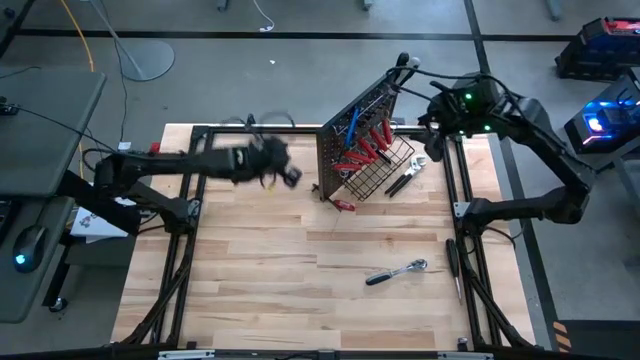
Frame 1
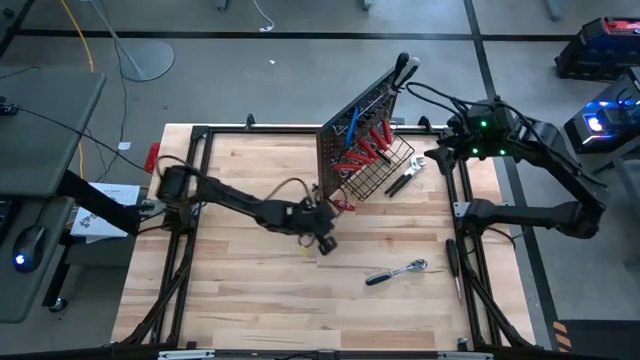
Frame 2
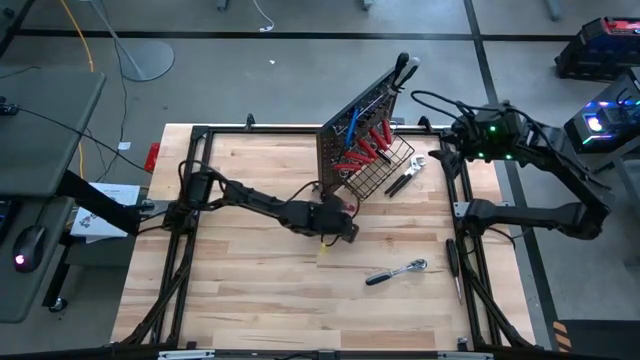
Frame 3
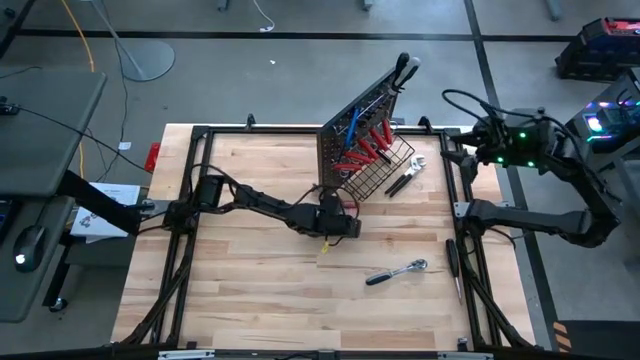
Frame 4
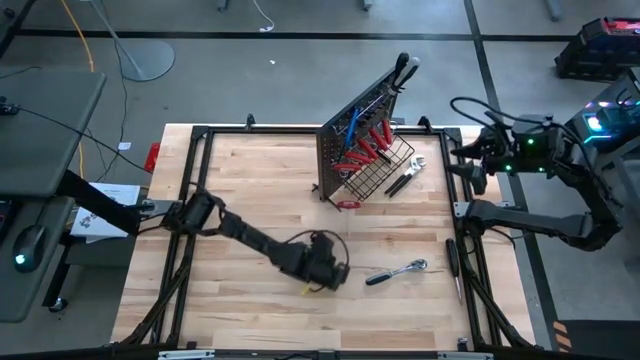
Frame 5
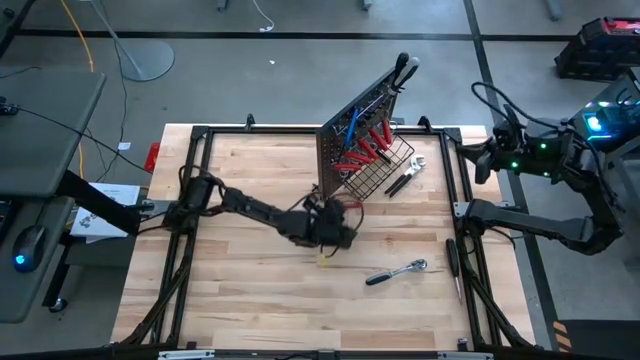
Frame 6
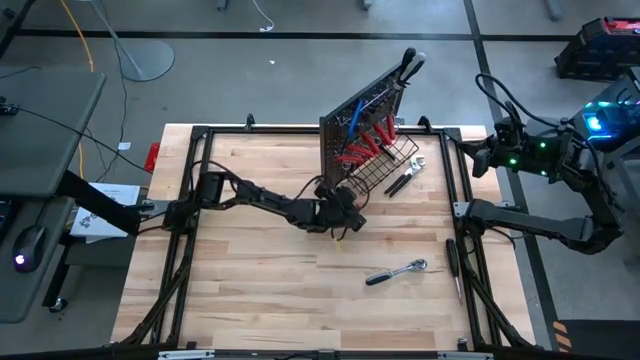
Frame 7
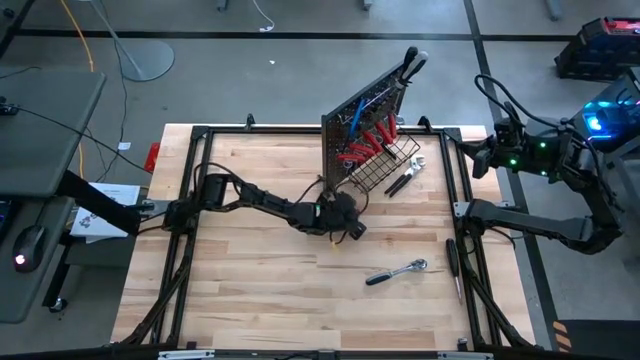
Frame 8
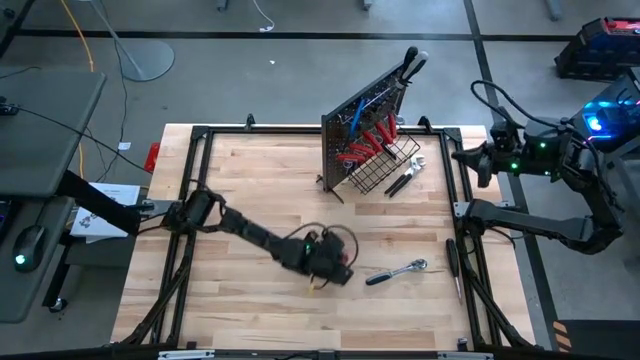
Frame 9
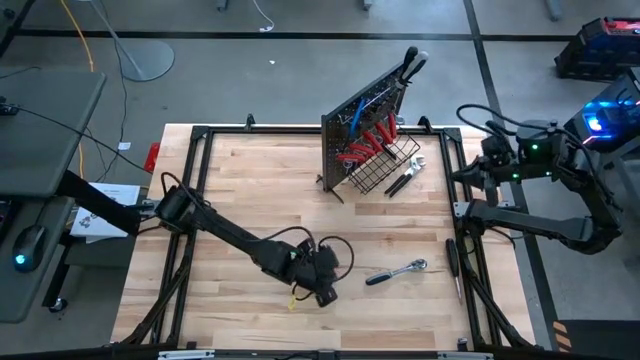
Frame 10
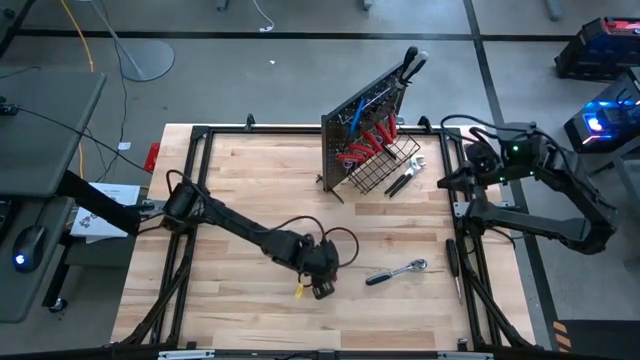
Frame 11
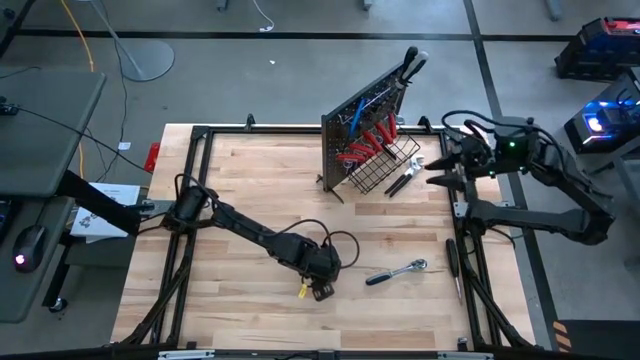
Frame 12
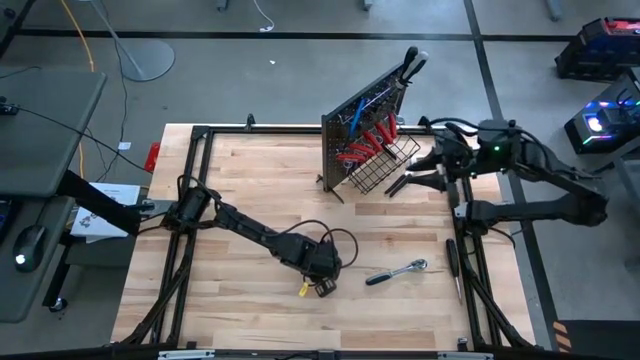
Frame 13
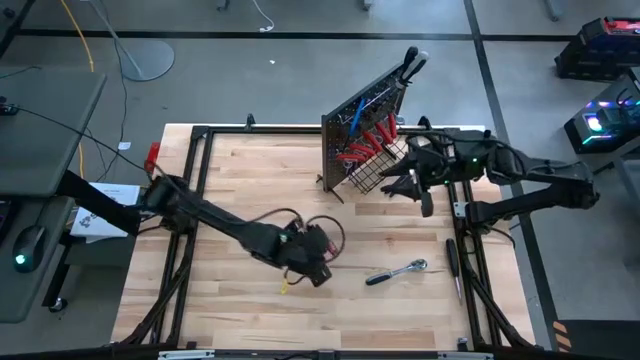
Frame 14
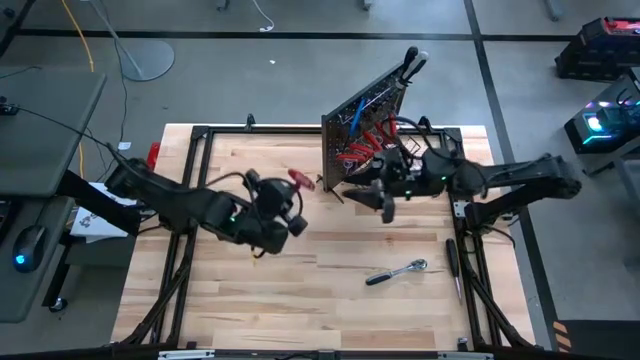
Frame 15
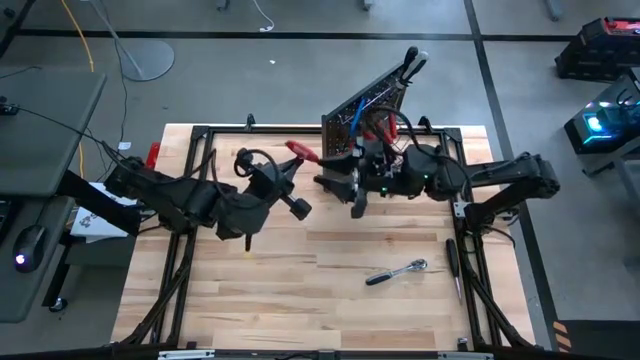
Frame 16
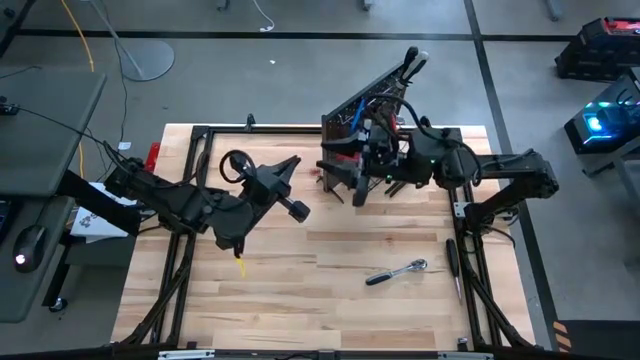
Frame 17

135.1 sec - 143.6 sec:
Task: Hang tools onto peg board
Hang the red allen wrench on the peg board

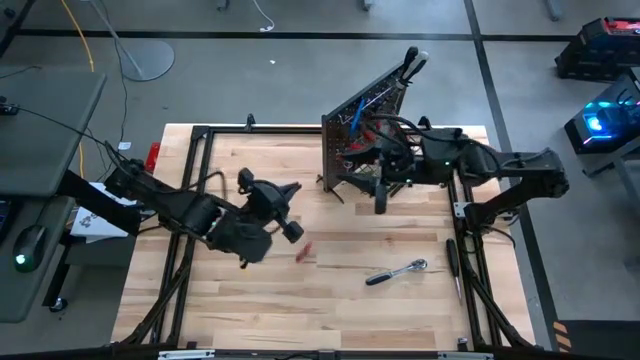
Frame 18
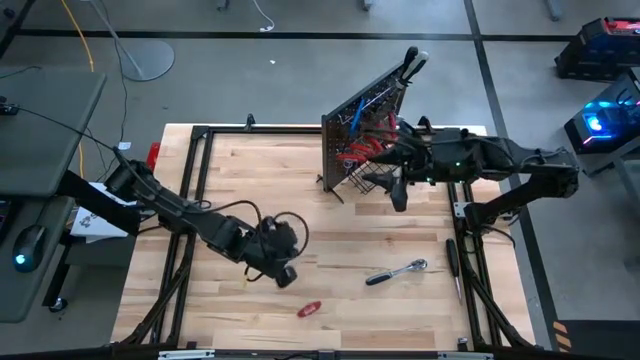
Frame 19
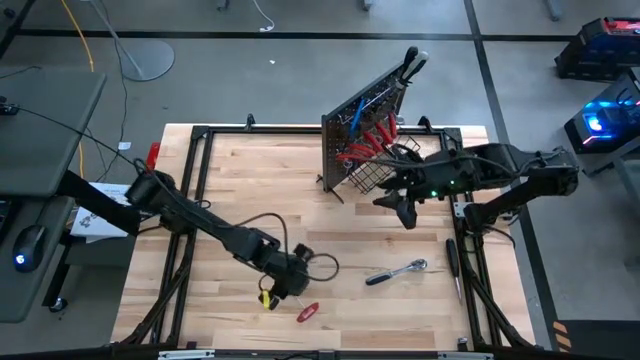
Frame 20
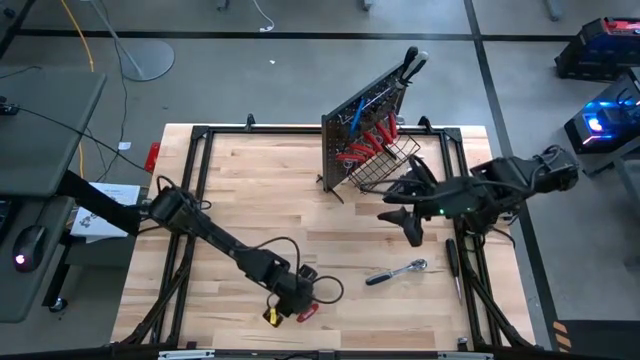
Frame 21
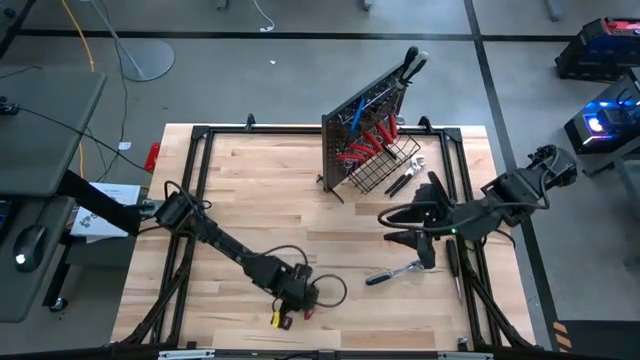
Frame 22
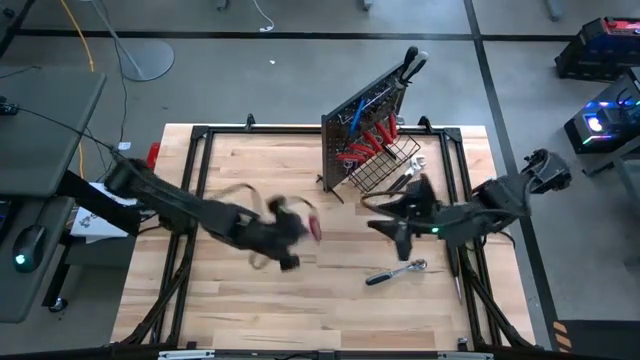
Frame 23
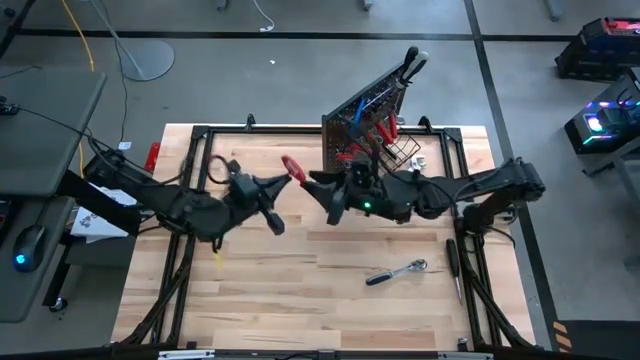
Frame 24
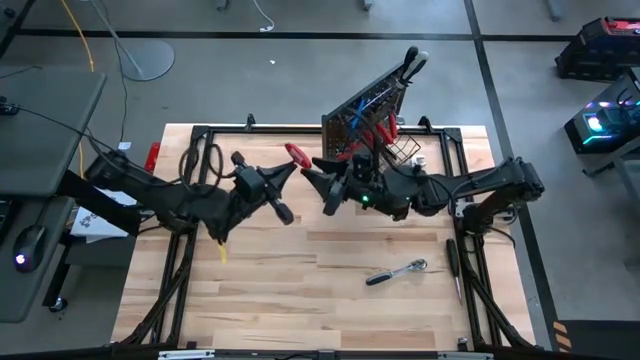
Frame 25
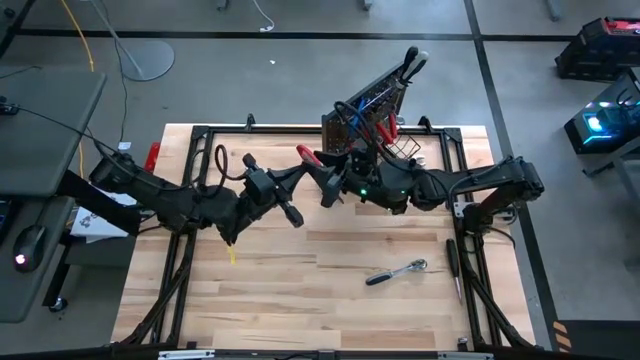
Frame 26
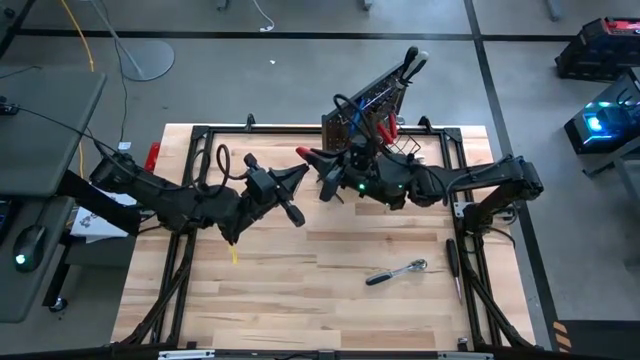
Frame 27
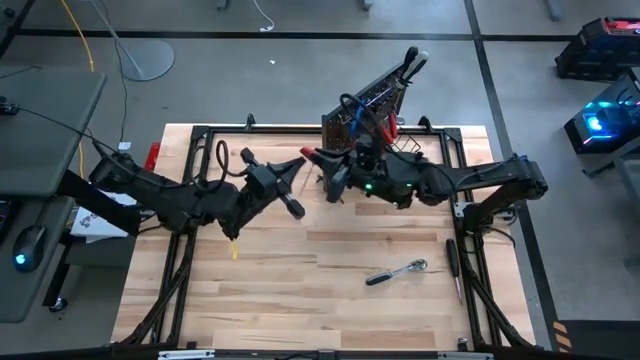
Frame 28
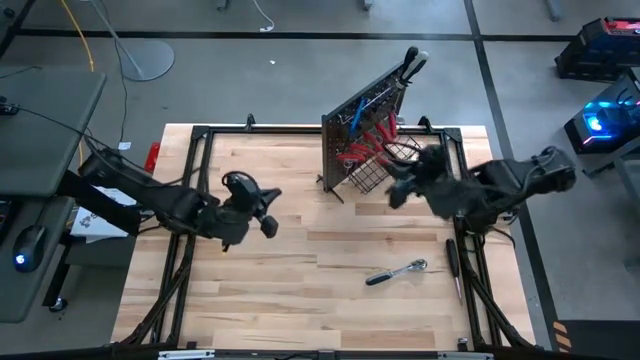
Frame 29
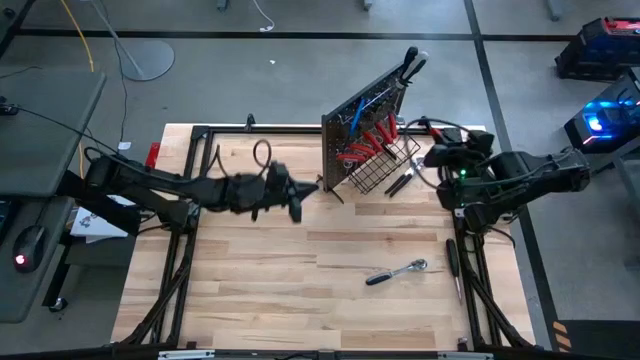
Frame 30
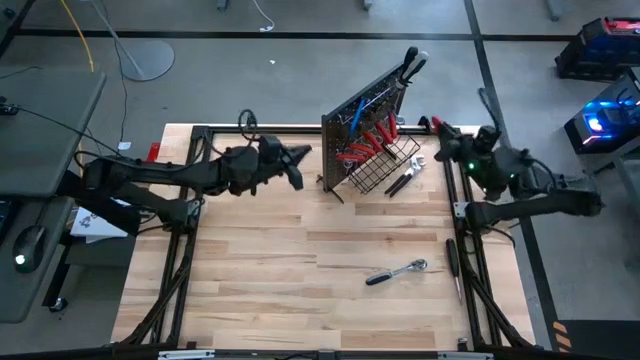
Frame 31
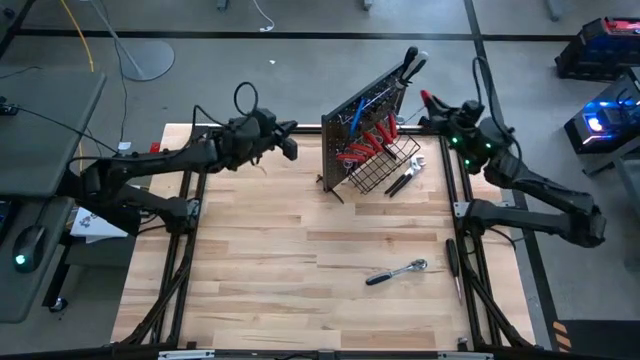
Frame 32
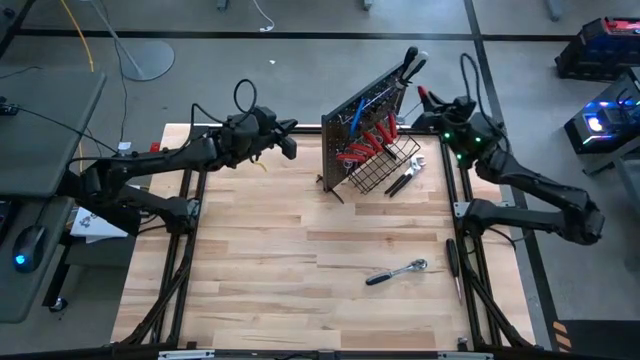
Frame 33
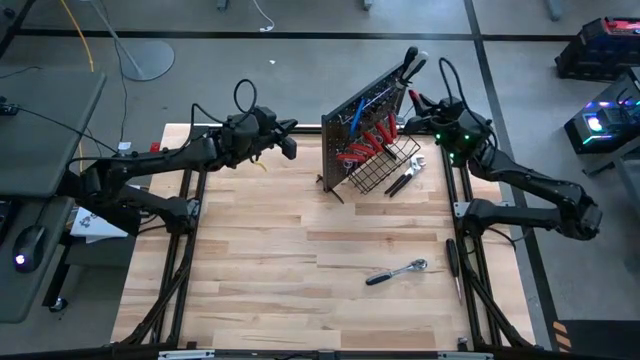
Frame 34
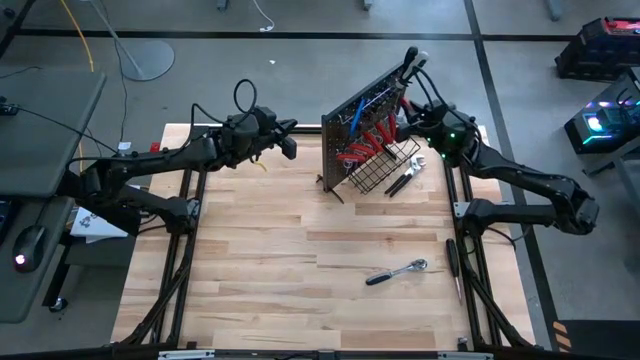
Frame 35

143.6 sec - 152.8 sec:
Hang the red allen wrench on the peg board

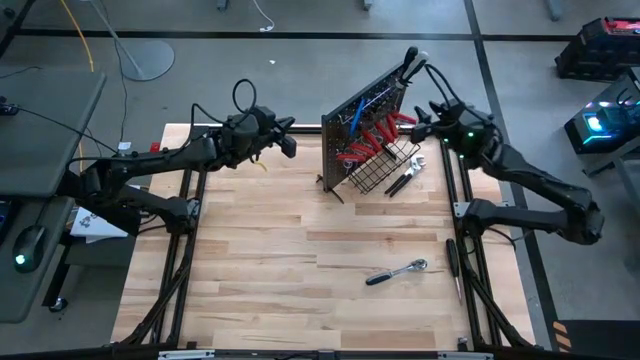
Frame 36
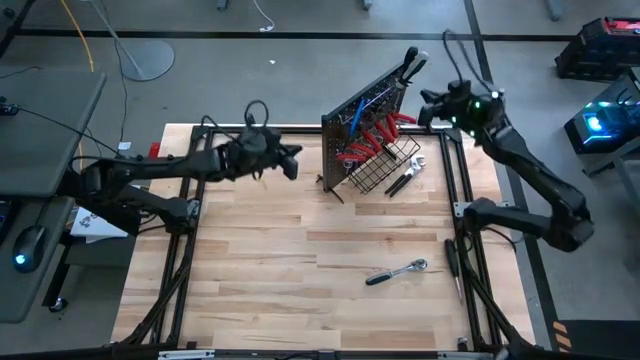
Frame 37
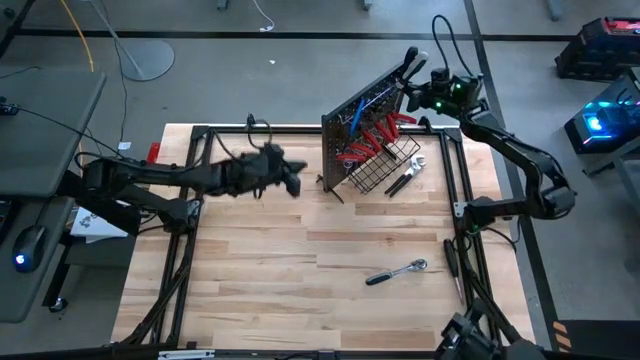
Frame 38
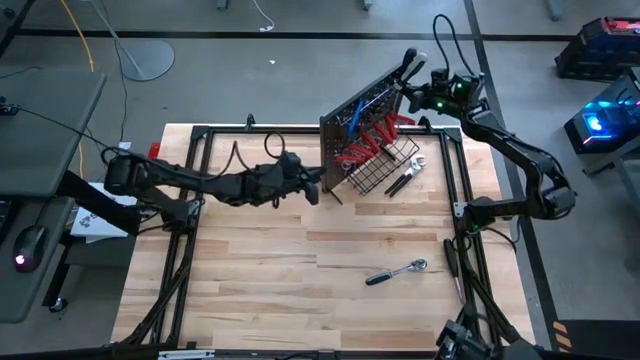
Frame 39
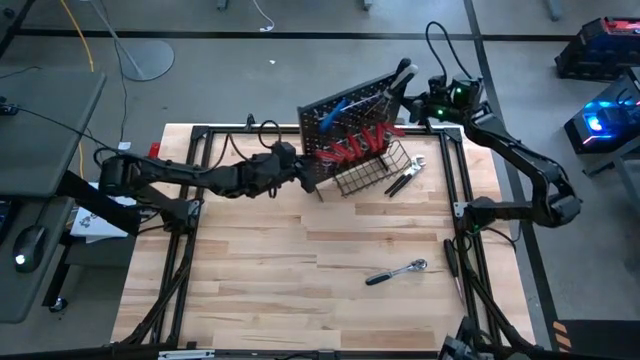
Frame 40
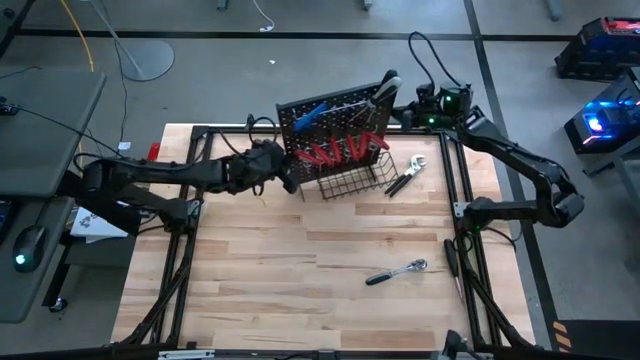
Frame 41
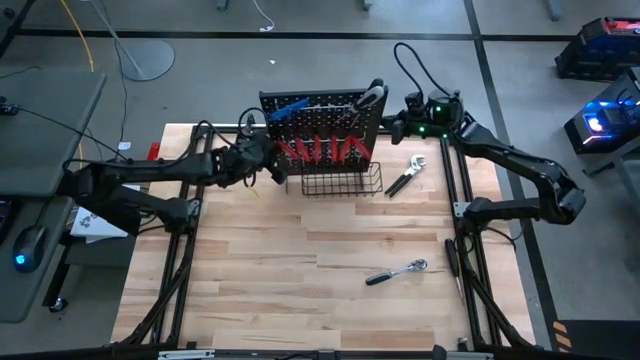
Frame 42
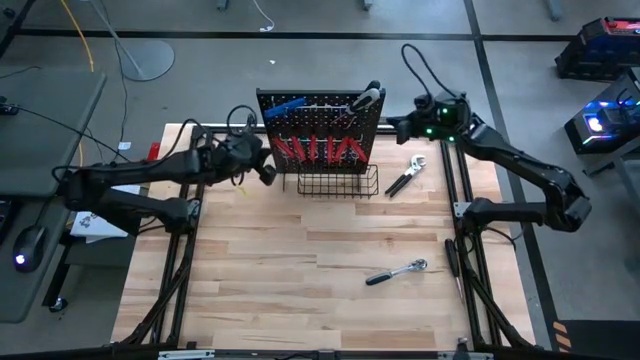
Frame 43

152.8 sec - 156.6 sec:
Adjust the peg board on the table

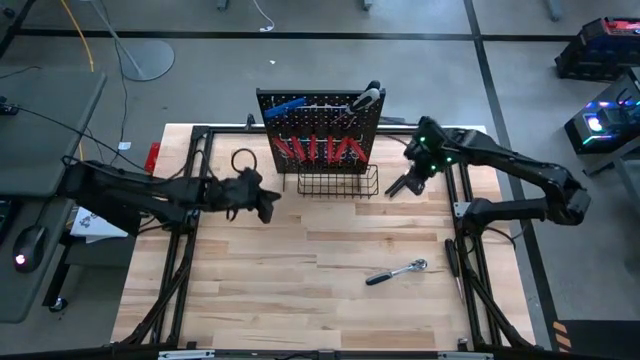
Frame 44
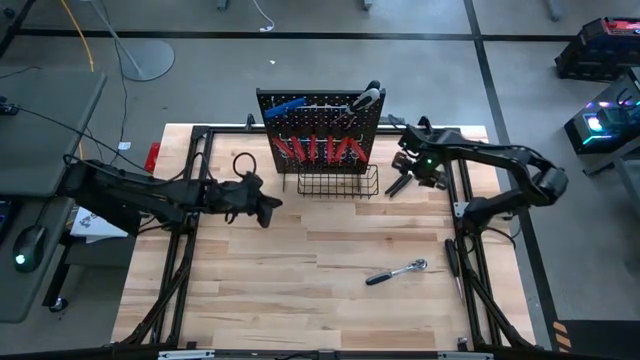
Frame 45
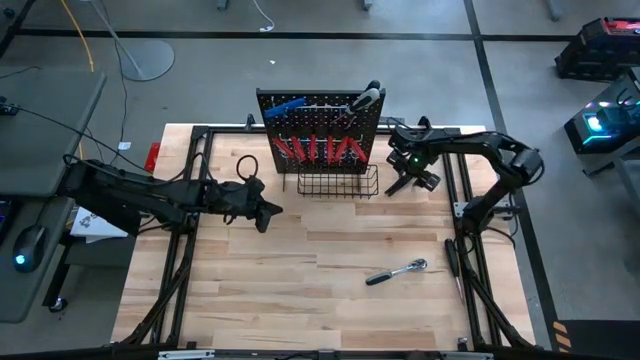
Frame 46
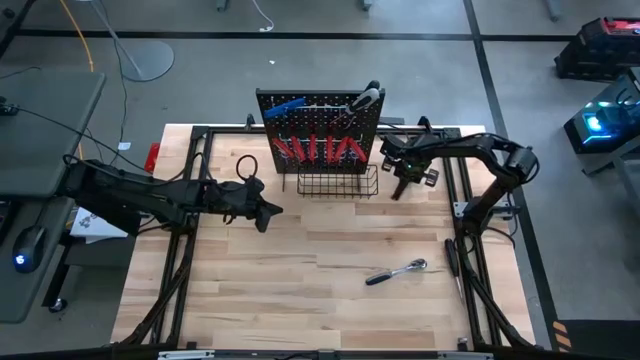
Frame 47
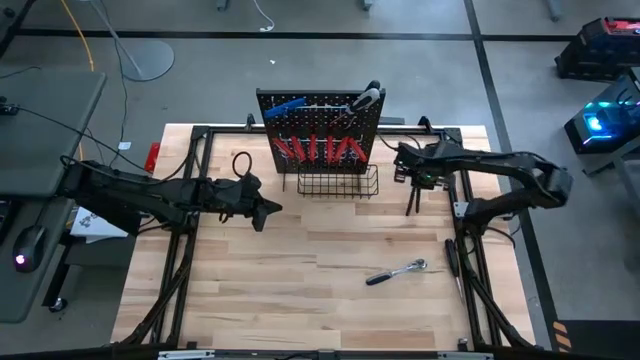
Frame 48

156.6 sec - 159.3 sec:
Put the slip joint pliers into the black wire basket on the peg board
